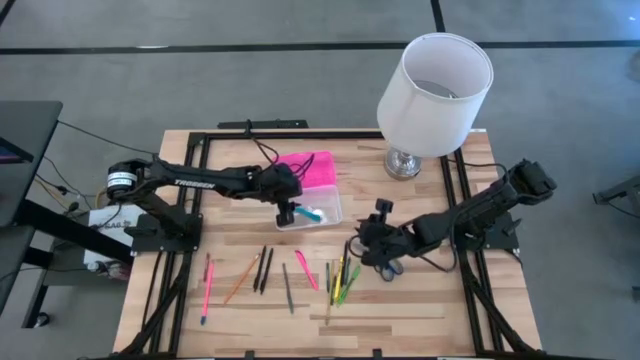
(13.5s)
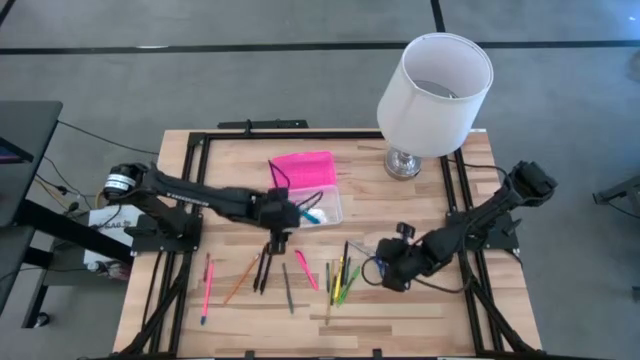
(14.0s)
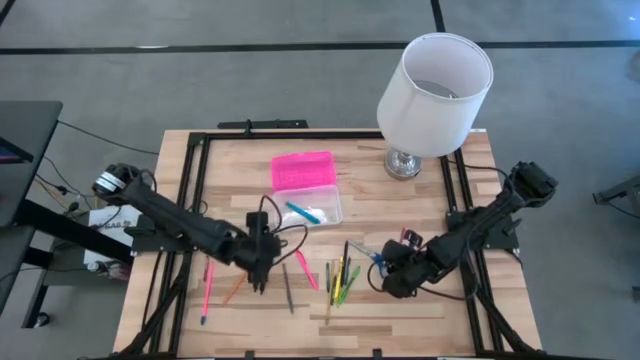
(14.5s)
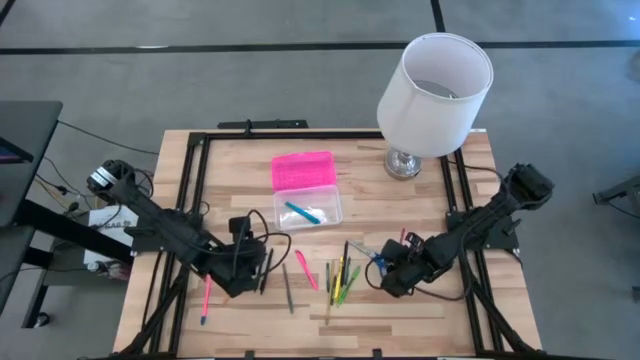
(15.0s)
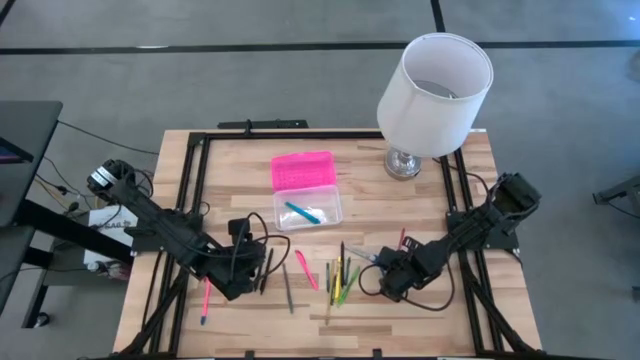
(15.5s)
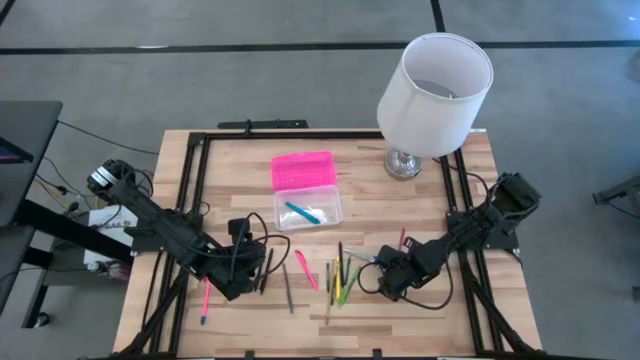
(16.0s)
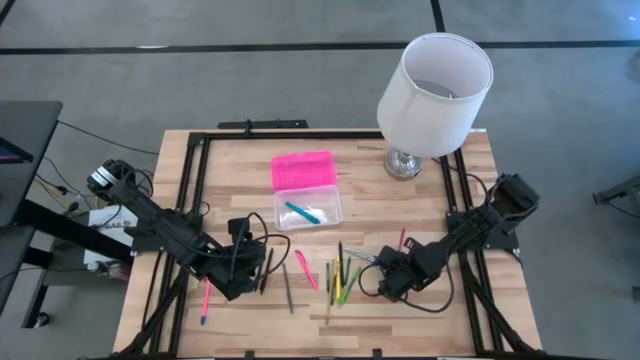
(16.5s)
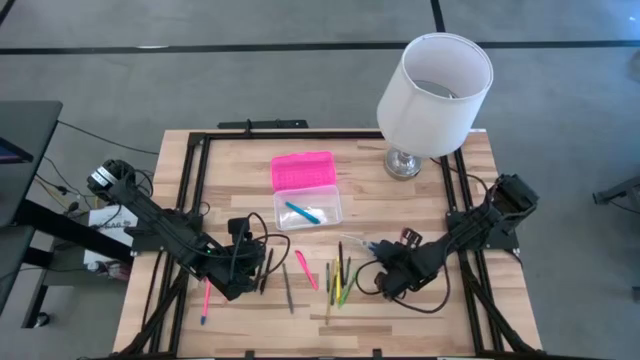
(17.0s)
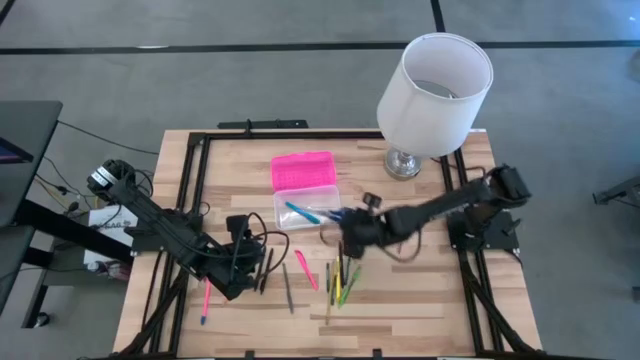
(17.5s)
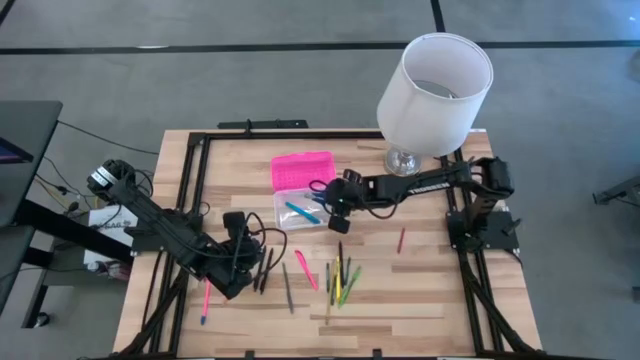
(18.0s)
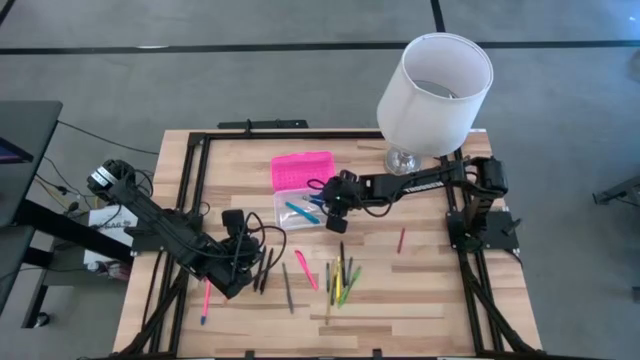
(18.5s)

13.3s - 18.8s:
Task: Pick & place school supplies into a supply box
Put the blue scissors into the pink supply box

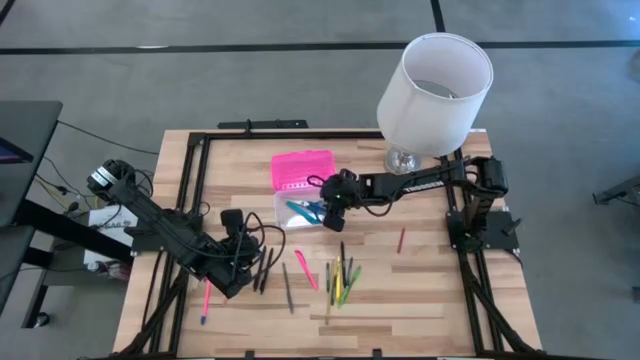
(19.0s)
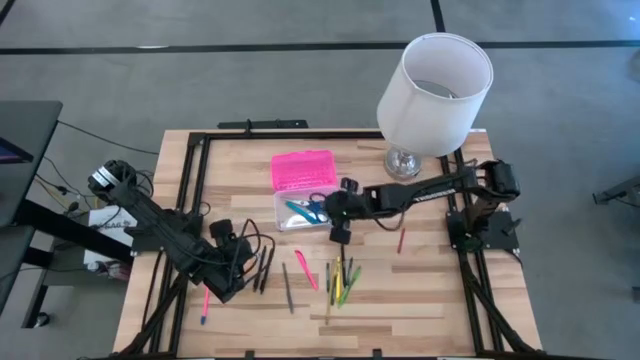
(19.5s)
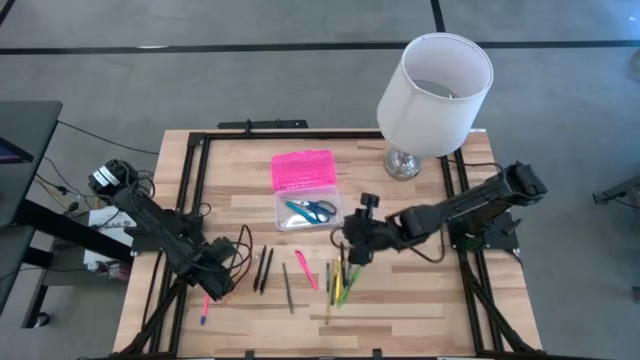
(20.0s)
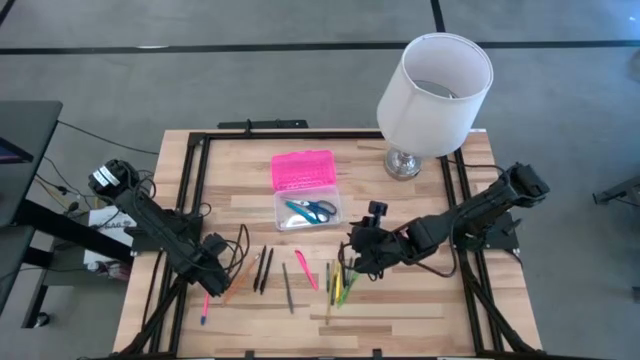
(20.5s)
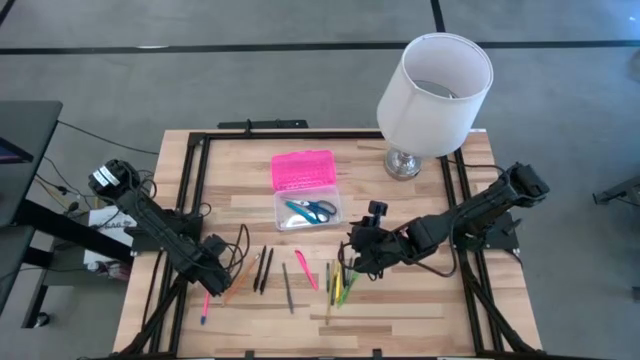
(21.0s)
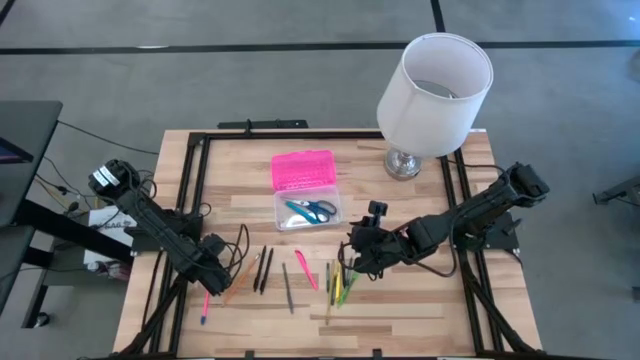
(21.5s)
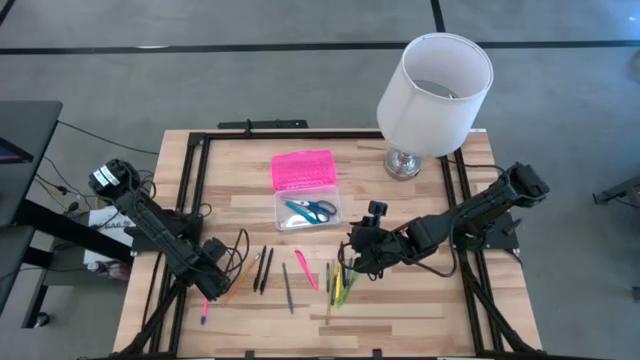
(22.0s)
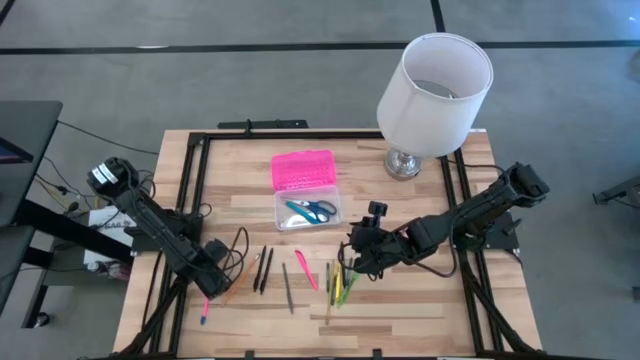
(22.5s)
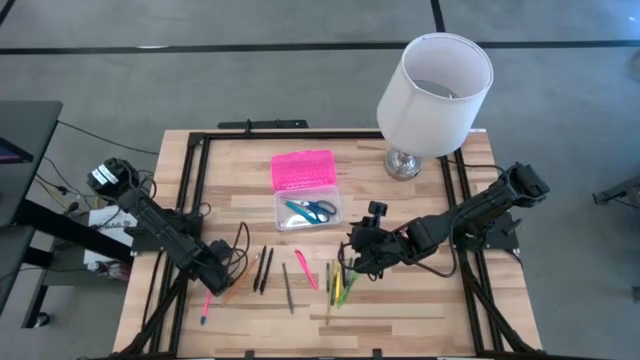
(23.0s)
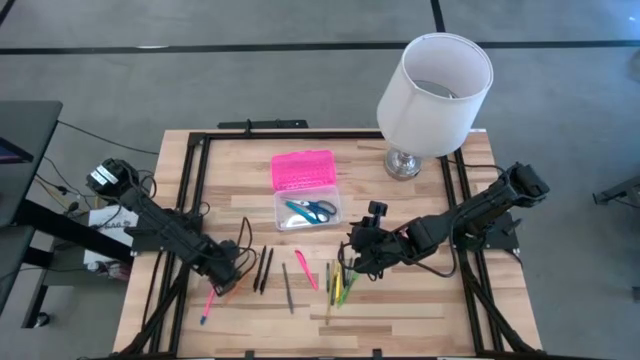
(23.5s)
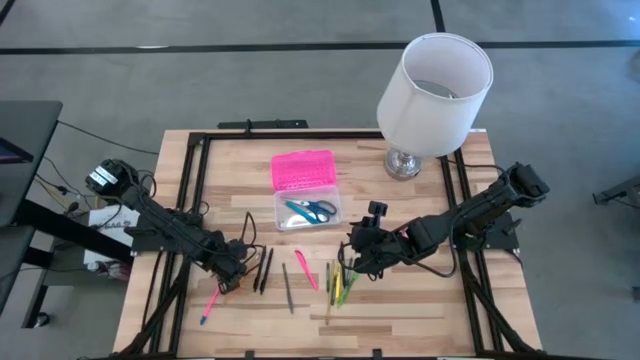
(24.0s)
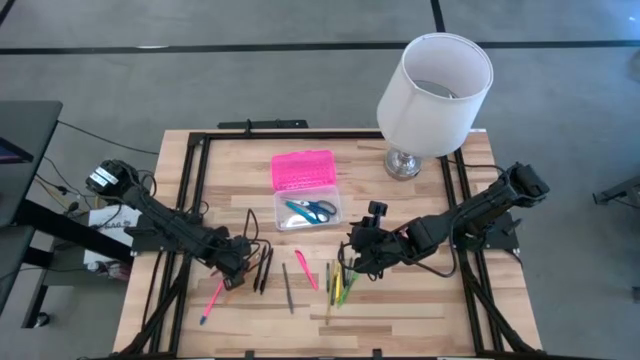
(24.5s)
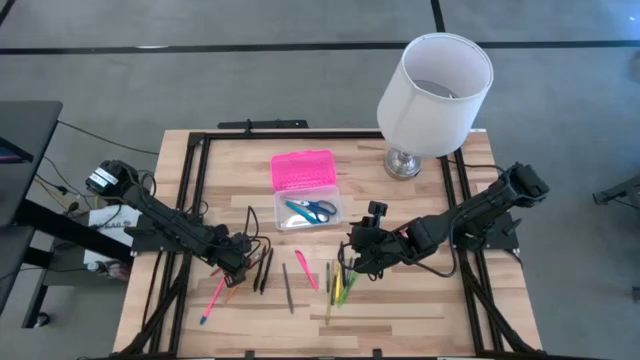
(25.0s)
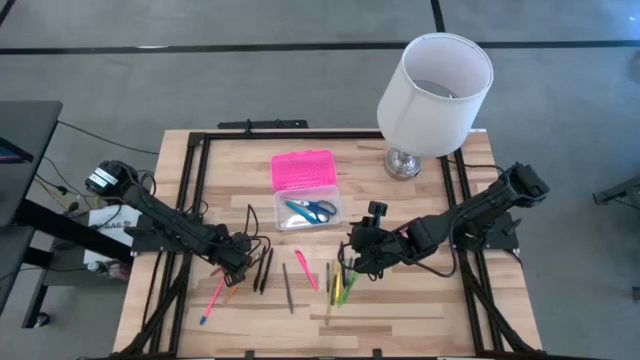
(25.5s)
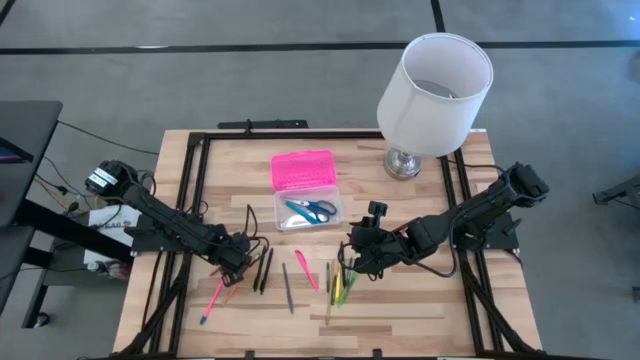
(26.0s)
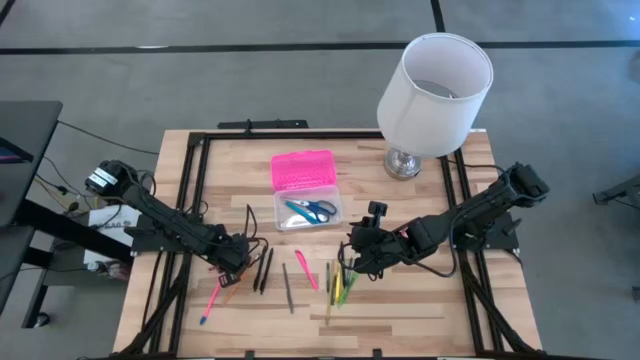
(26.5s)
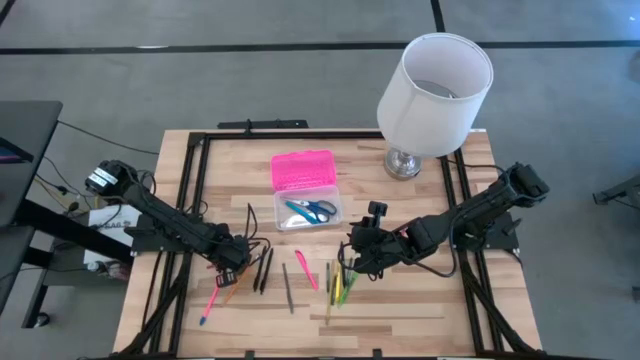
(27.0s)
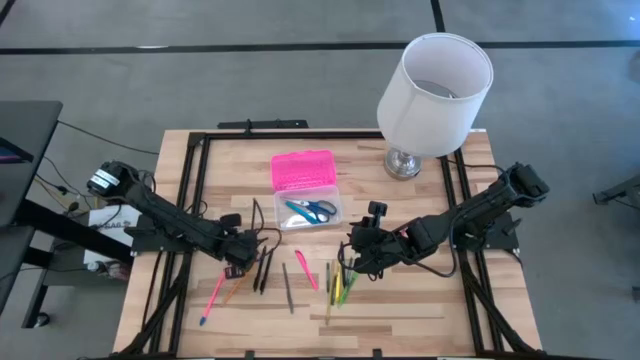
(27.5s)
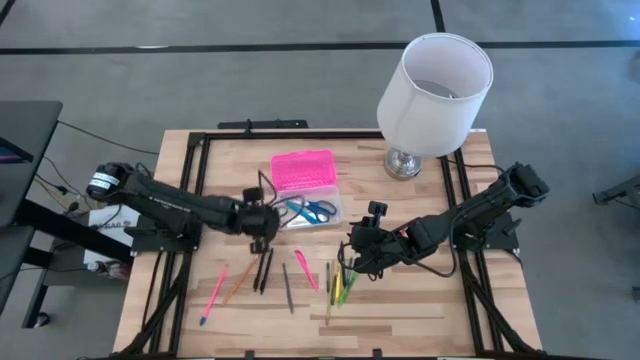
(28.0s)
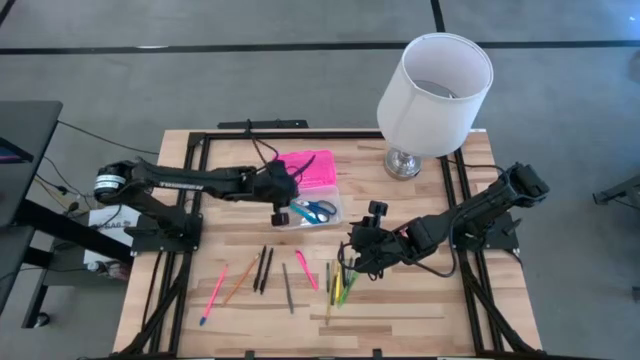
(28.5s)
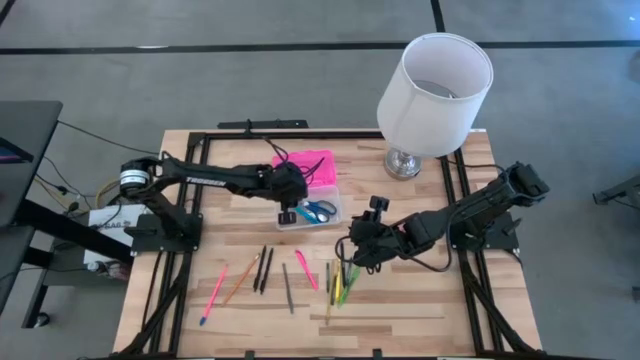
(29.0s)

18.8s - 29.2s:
Put the left red crayon into the pink supply box

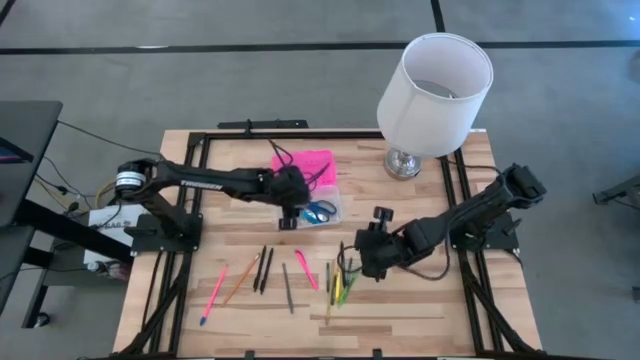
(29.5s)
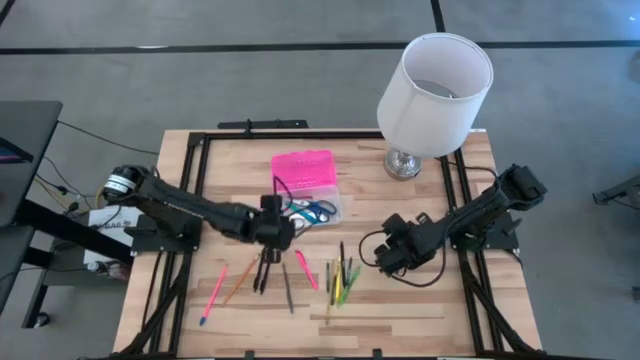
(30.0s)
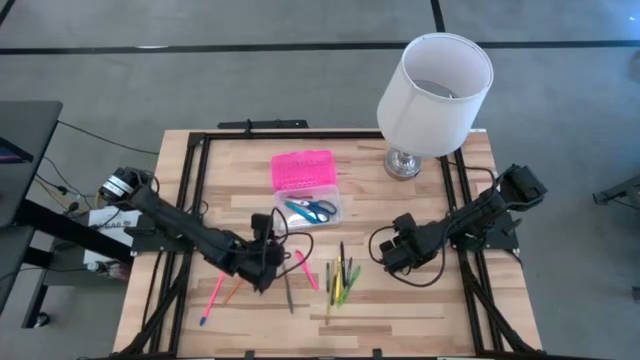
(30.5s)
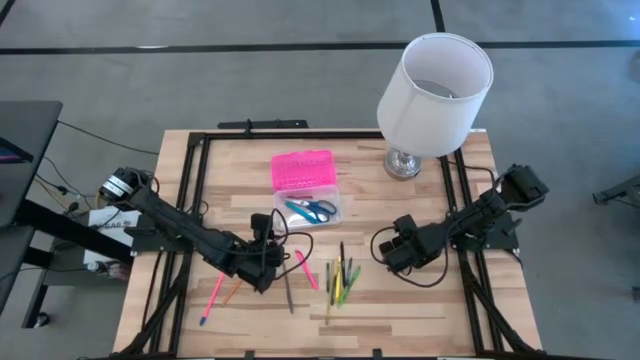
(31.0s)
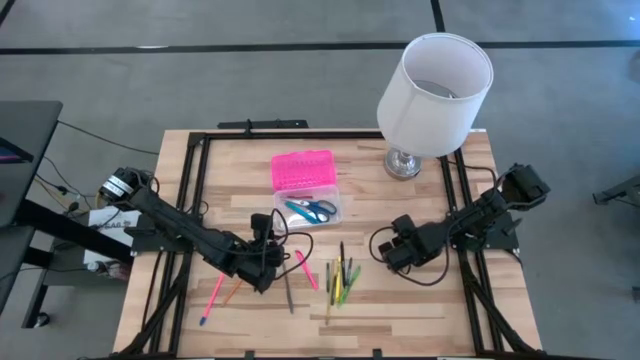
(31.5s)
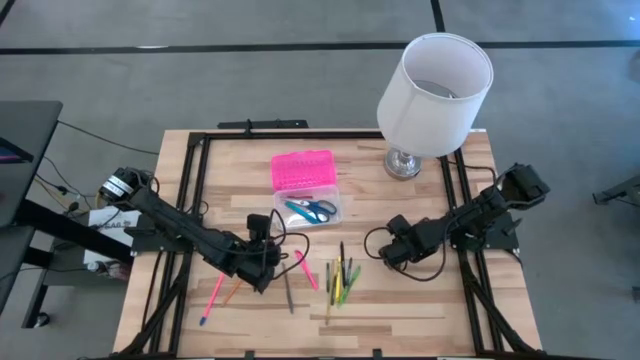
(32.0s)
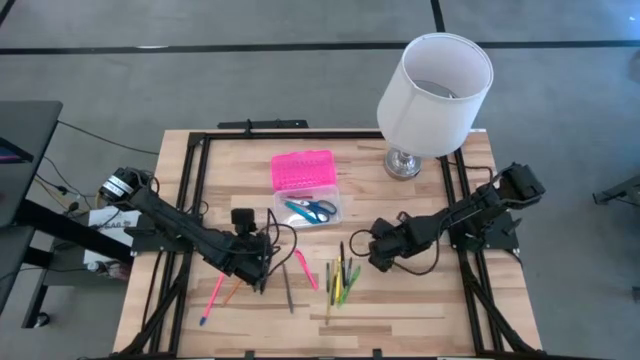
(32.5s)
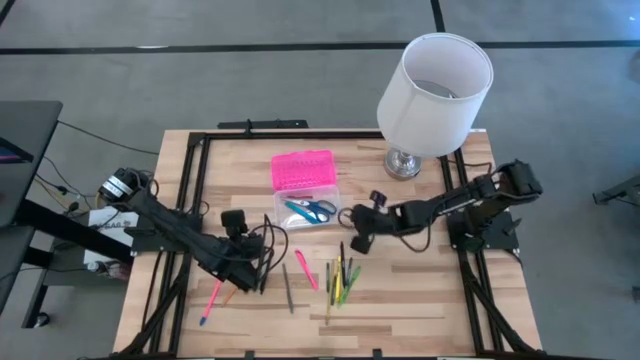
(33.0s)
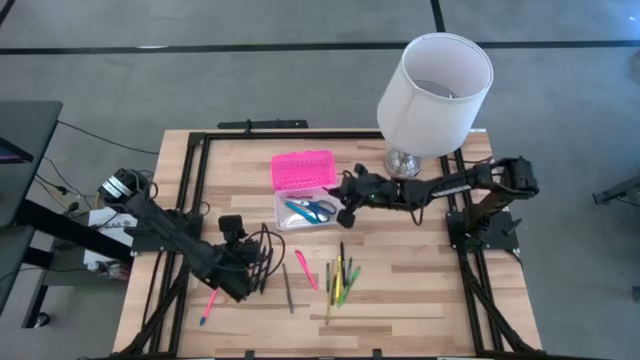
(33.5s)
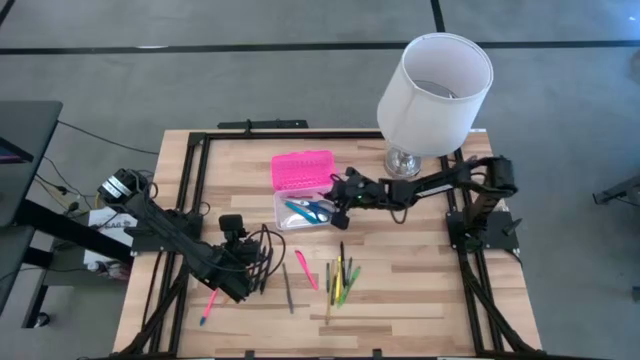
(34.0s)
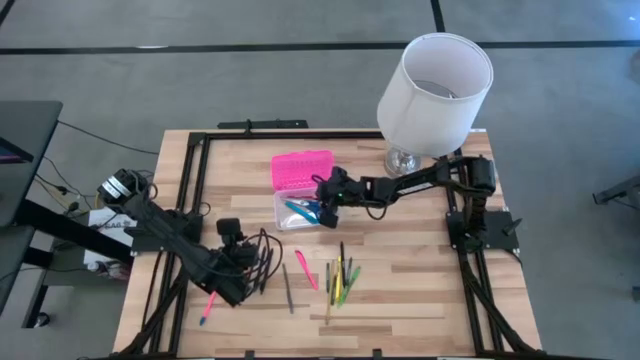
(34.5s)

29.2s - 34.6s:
Put the red crayon into the pink supply box
